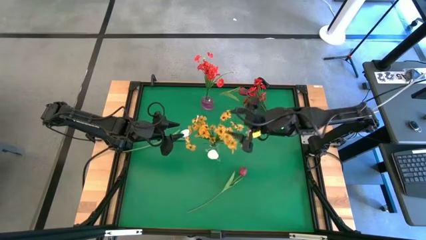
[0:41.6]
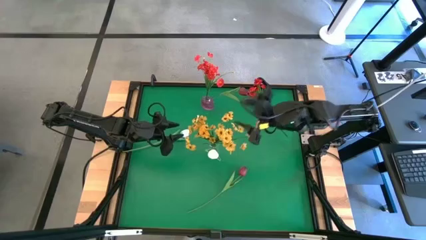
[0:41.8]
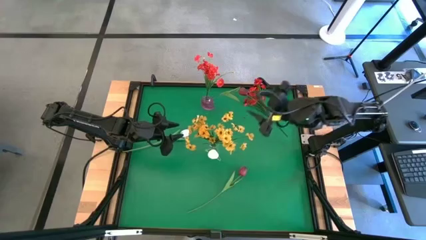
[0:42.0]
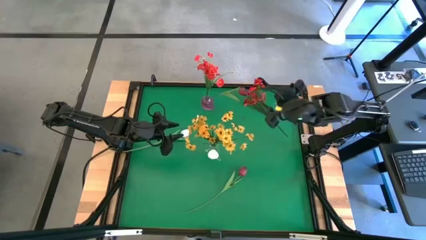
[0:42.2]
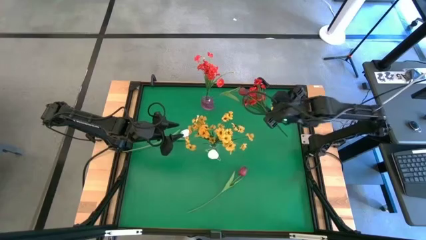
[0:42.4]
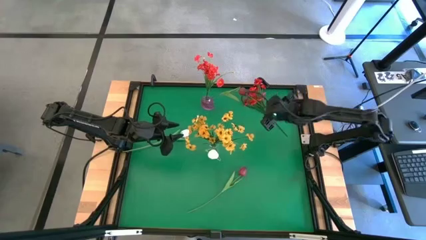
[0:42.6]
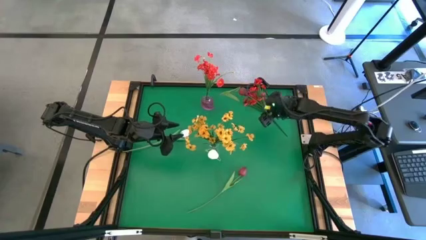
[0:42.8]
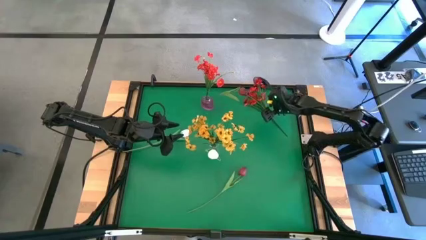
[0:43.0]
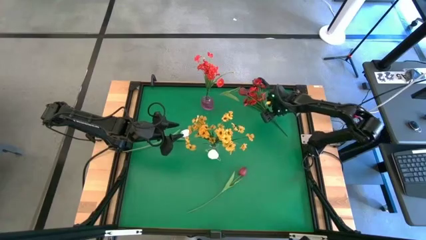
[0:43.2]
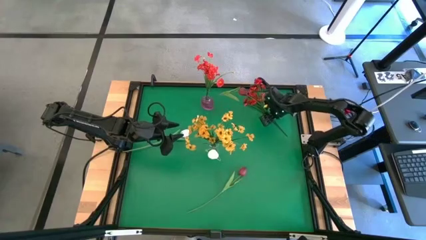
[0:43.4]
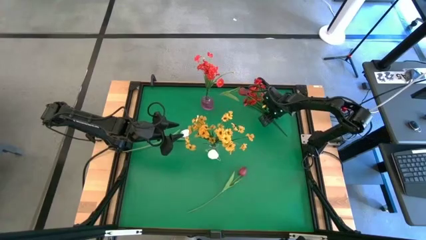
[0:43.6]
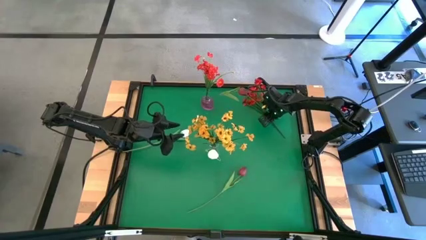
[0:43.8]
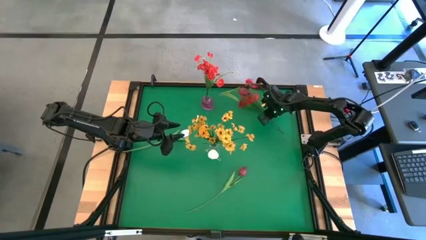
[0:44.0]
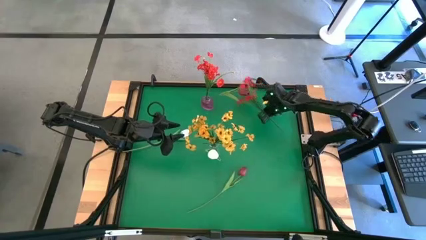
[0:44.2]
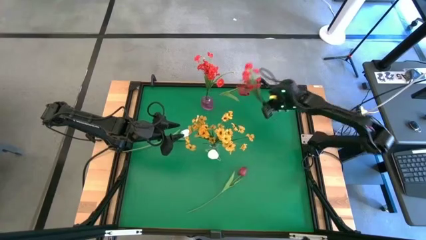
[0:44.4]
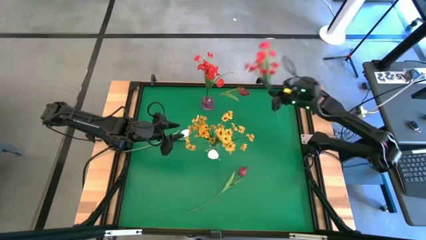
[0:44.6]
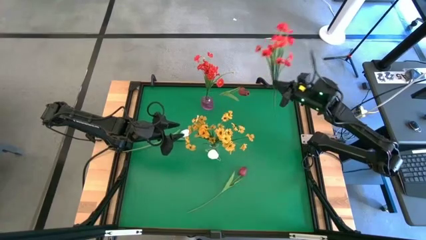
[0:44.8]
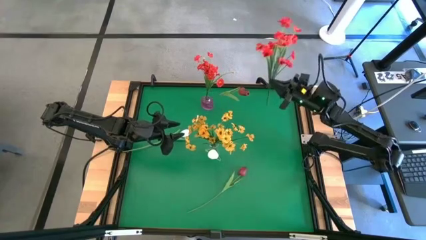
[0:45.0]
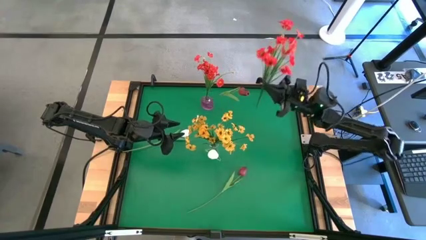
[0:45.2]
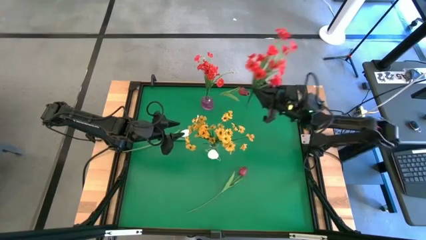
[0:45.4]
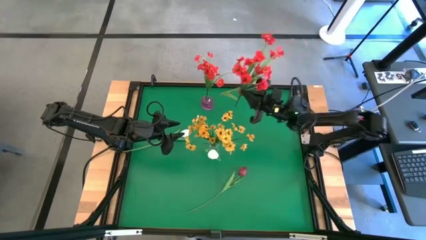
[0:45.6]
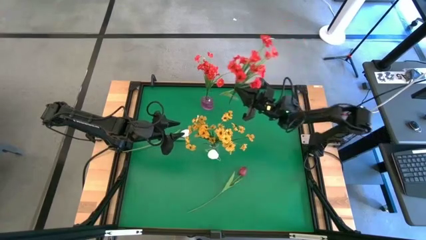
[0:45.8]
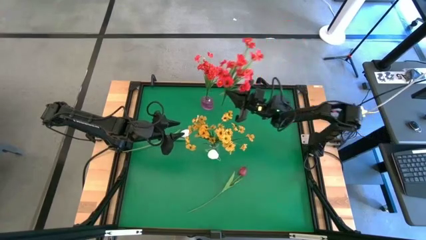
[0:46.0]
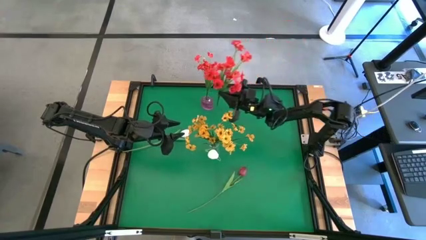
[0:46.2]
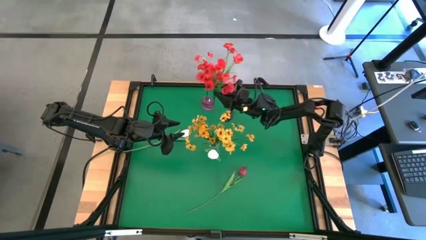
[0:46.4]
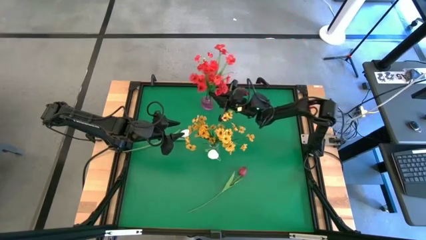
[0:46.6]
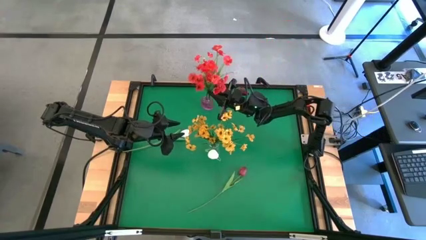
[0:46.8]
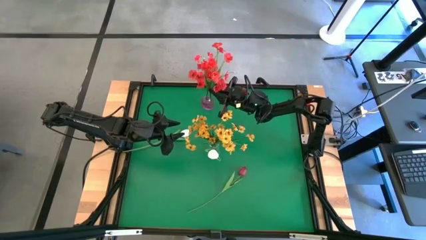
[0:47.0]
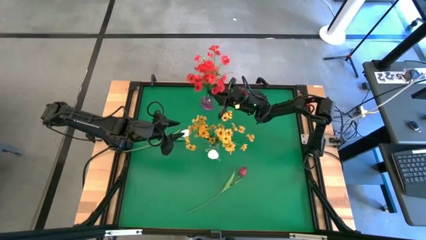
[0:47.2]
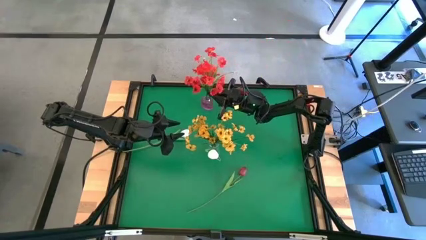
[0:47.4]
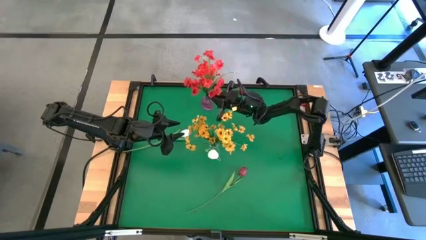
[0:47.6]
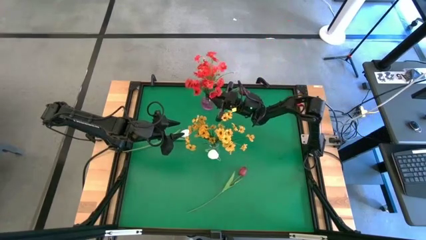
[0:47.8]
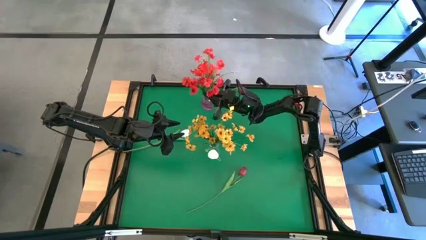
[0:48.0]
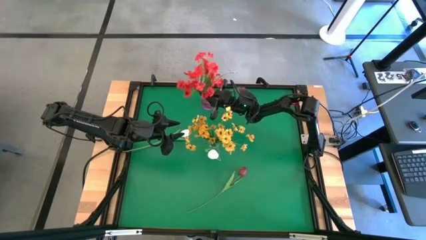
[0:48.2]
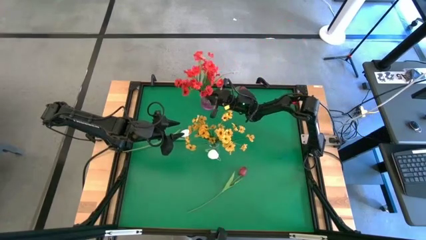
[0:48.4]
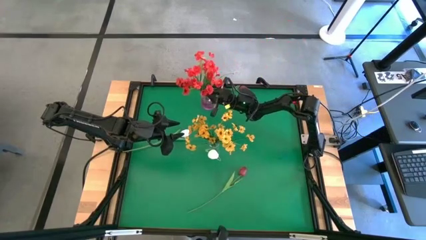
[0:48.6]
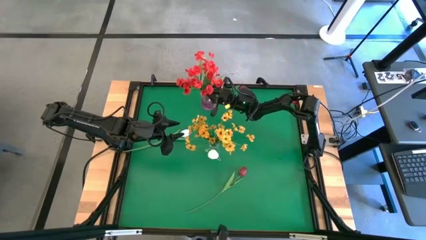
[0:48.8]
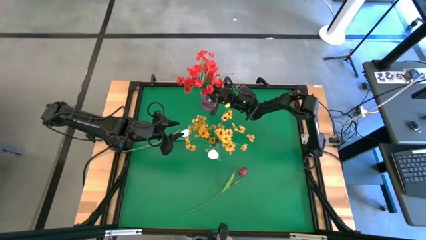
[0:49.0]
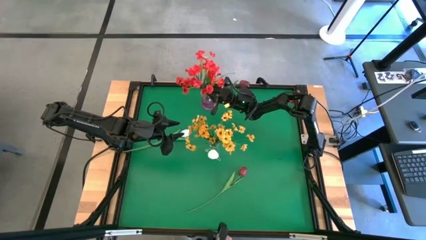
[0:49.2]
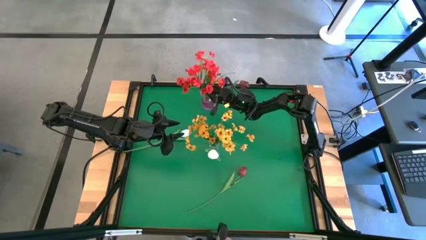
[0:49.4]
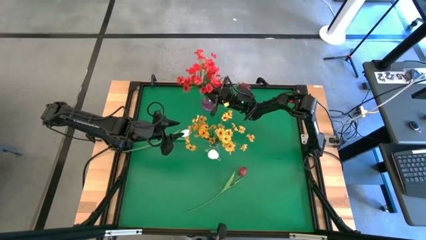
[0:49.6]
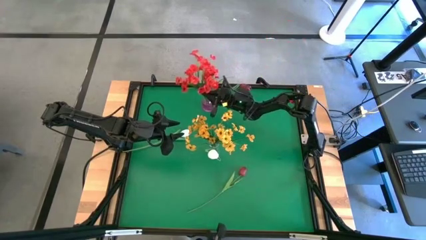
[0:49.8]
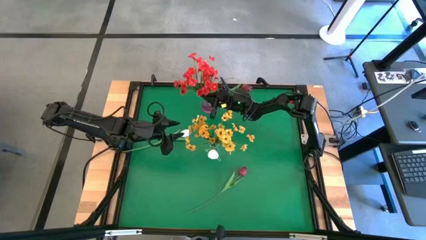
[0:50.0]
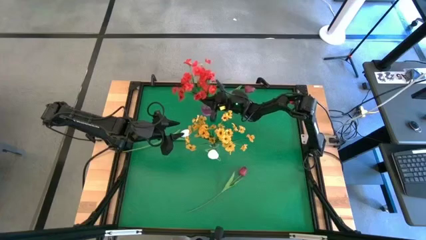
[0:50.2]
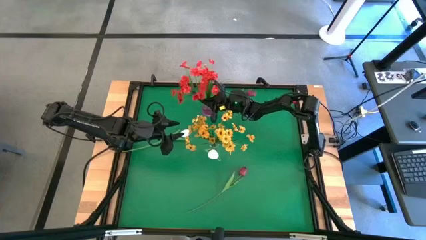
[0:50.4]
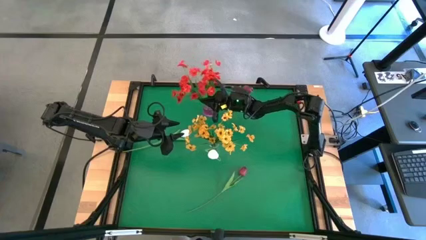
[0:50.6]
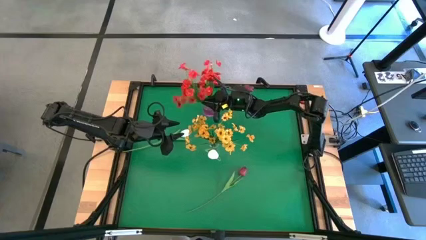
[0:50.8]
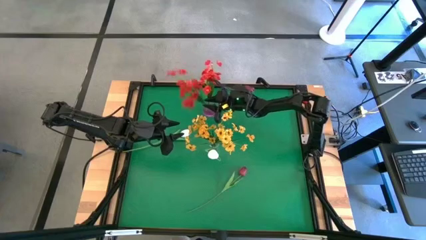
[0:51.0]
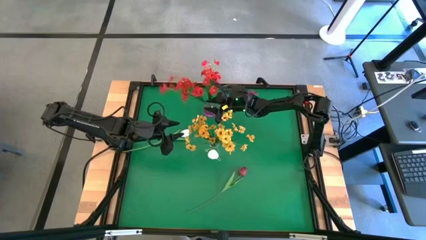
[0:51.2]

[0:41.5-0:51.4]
Task: Sort flowers into vase by color
Put the red flowers into the pink vase

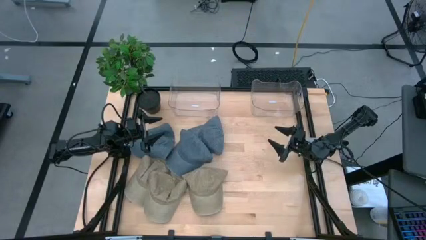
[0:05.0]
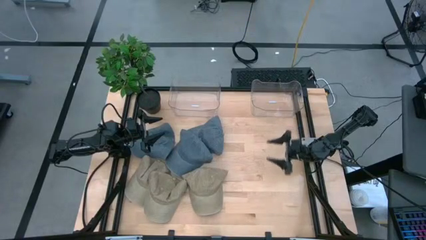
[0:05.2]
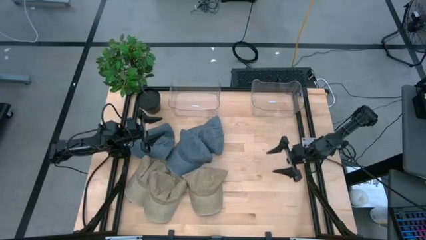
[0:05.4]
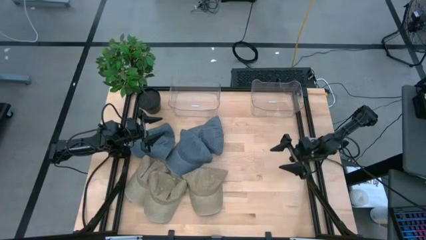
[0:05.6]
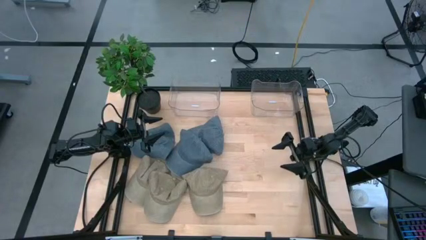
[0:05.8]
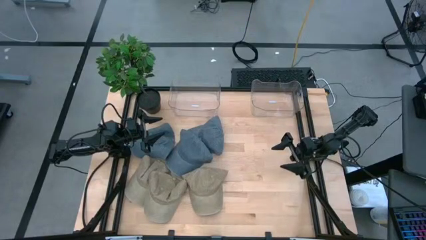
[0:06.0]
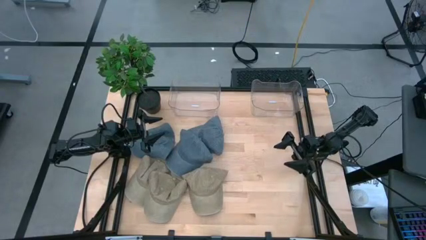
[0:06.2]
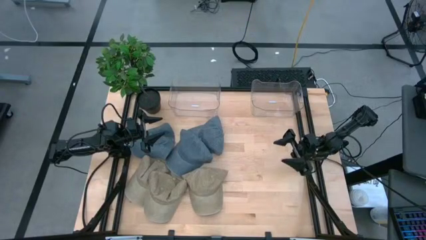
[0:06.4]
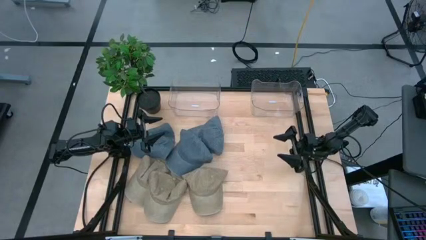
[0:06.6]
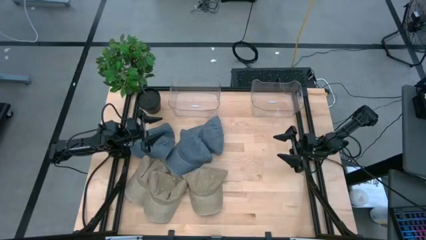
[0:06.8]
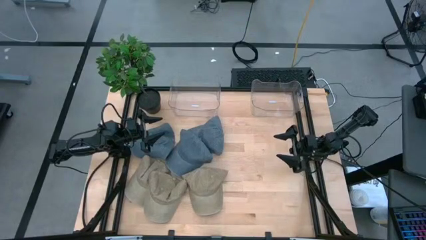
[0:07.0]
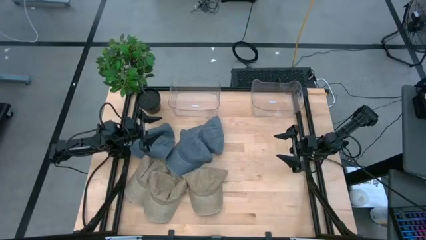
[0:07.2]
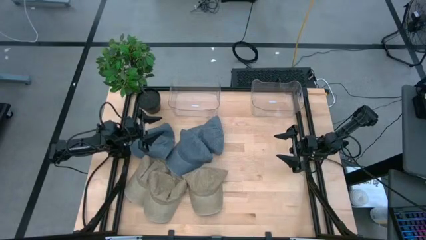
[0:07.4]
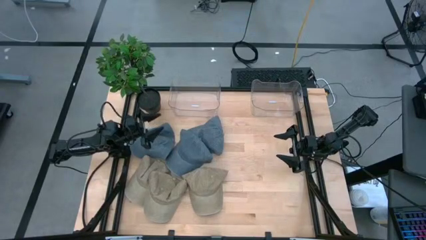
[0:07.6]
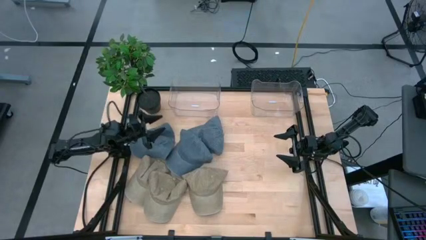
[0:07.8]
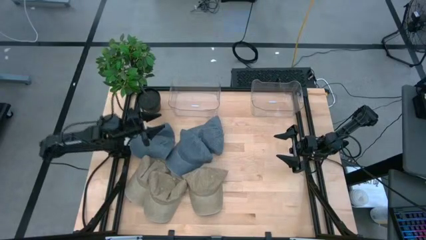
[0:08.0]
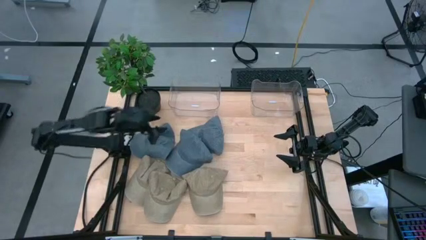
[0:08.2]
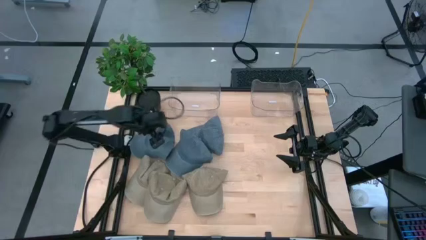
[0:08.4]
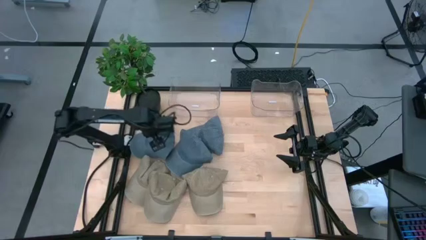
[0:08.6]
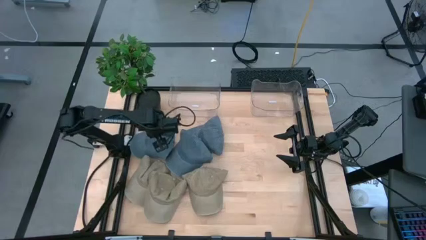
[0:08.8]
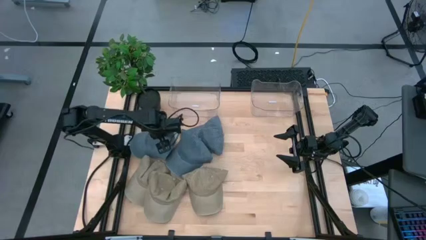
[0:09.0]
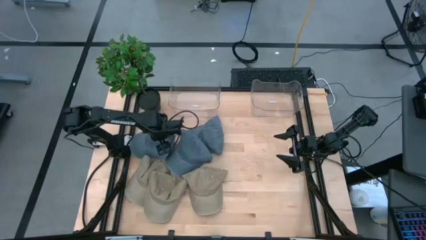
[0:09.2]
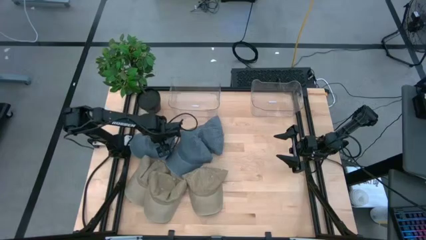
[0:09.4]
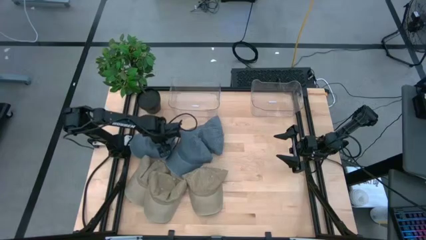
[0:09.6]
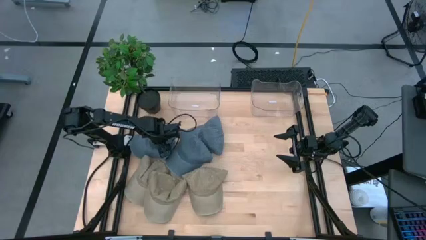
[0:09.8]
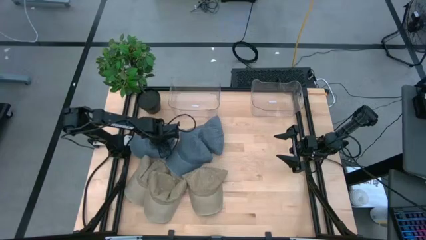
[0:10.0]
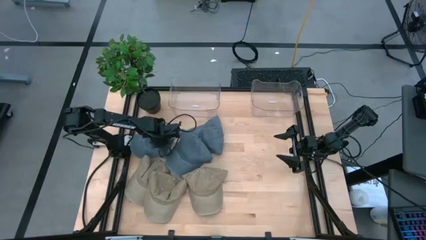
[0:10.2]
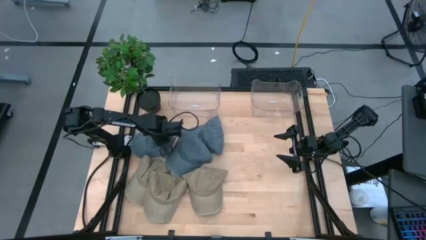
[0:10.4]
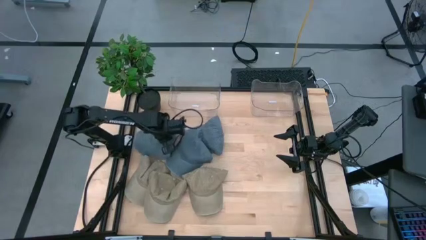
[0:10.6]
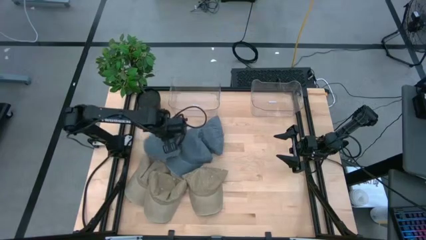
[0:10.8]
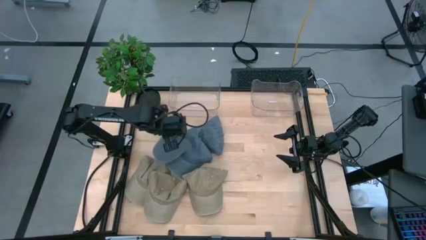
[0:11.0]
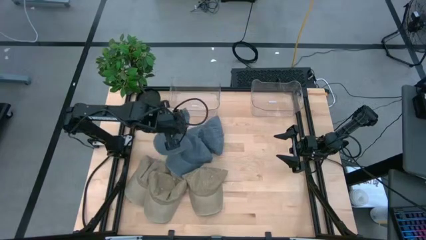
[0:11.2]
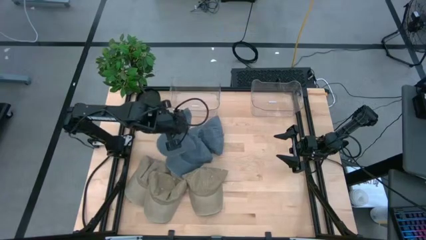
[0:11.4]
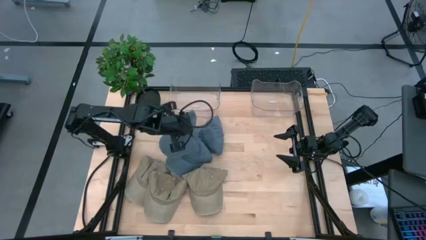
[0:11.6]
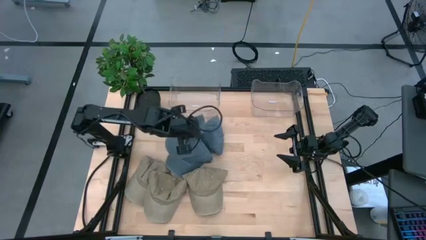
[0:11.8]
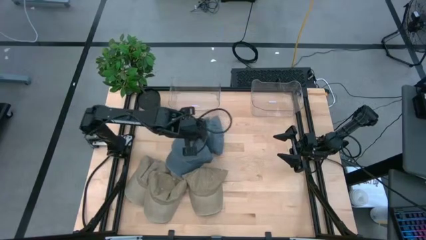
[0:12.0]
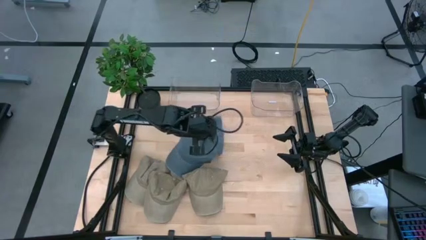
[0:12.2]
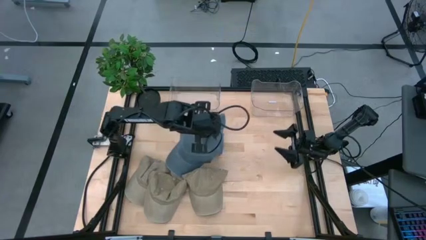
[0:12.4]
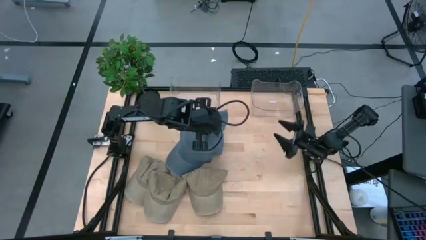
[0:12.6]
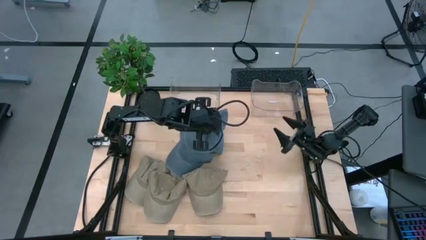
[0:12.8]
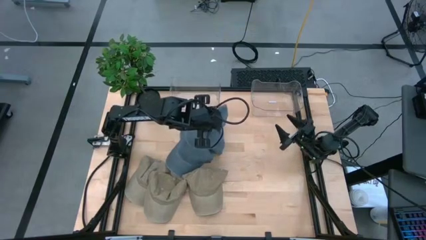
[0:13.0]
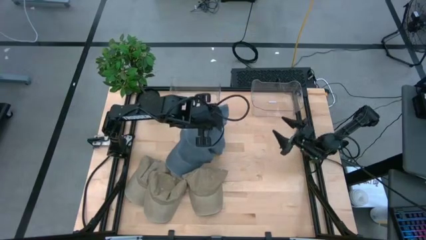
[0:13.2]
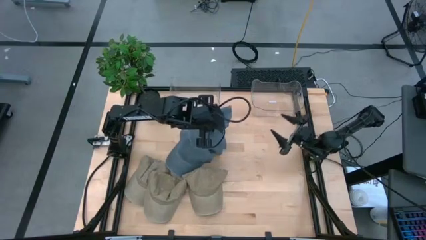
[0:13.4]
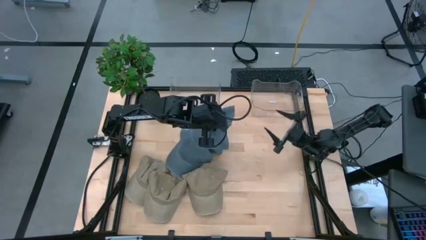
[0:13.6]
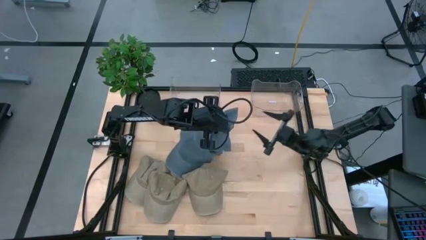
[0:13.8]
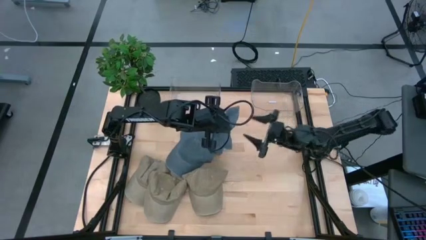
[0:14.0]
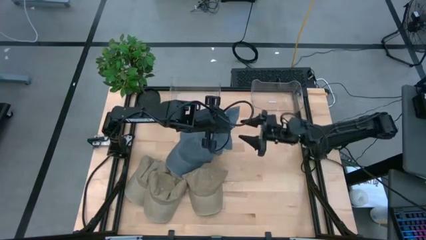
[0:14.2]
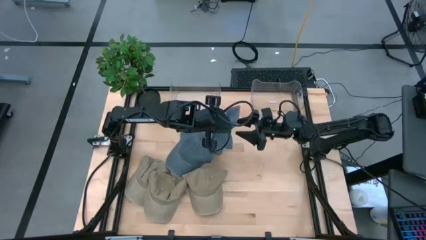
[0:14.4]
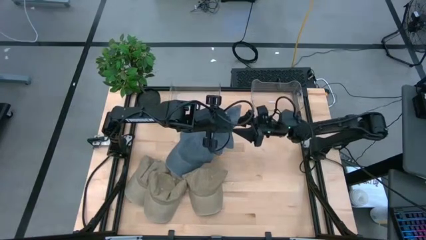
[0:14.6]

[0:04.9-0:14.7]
Task: Pick & Place hat
Put the left blue cap into the right transparent bin
